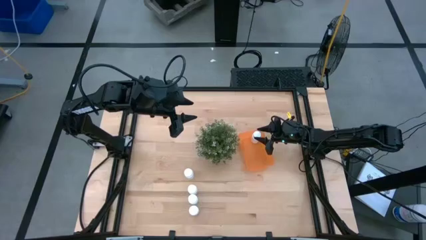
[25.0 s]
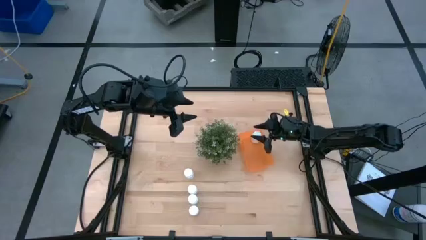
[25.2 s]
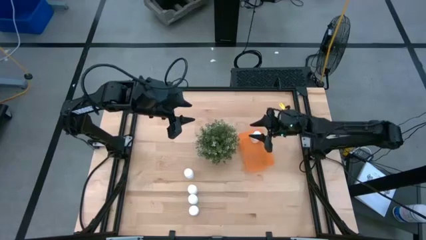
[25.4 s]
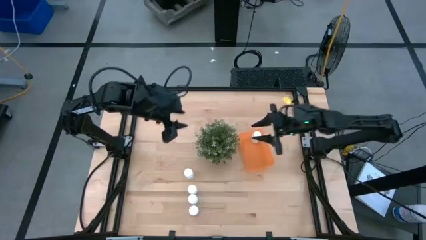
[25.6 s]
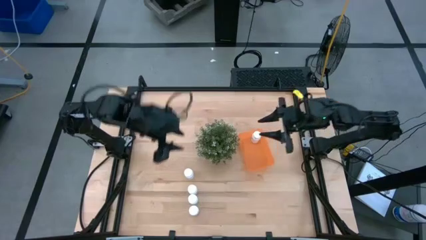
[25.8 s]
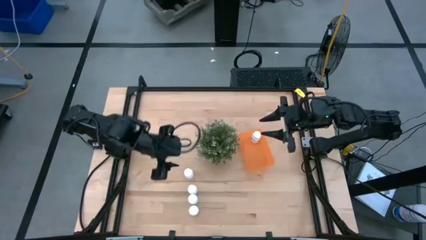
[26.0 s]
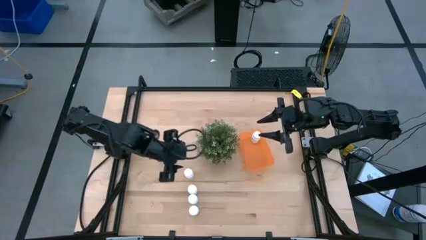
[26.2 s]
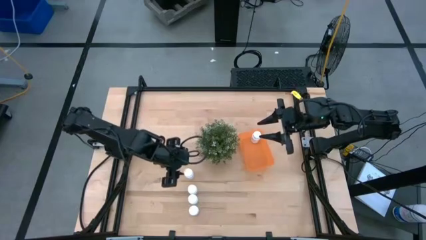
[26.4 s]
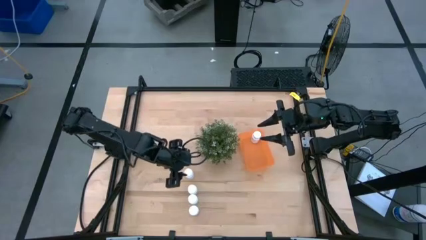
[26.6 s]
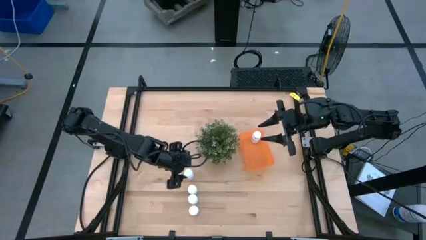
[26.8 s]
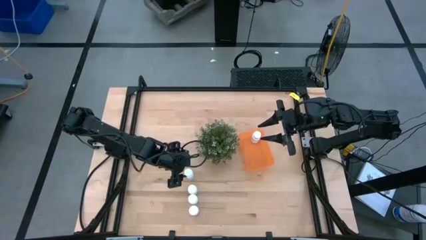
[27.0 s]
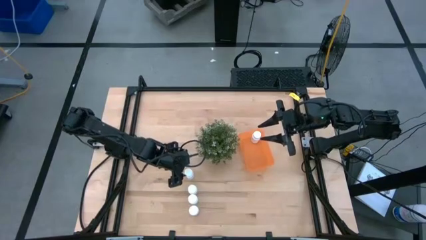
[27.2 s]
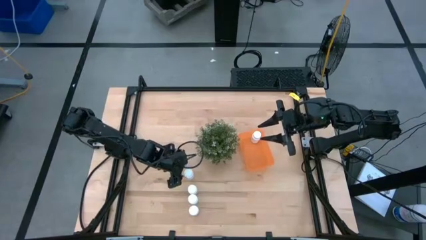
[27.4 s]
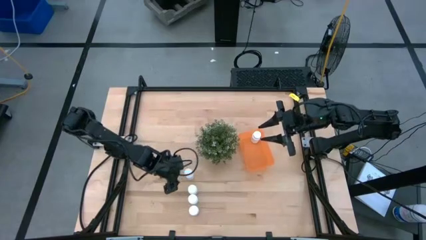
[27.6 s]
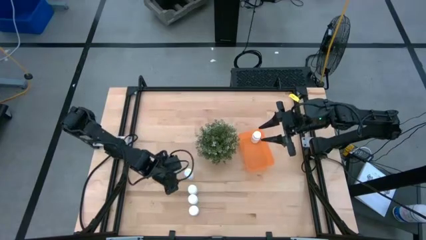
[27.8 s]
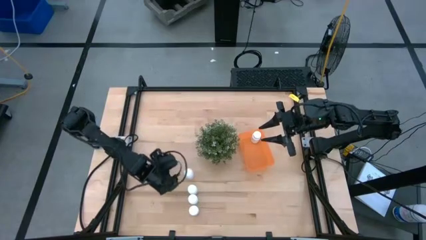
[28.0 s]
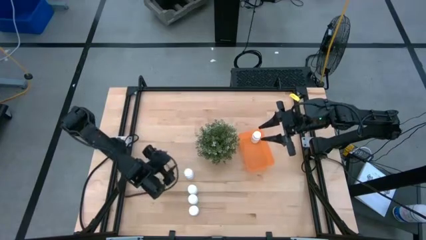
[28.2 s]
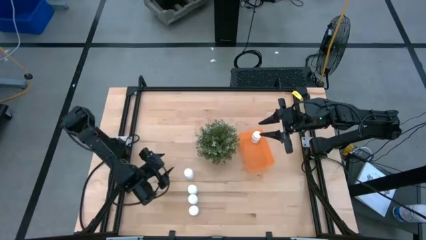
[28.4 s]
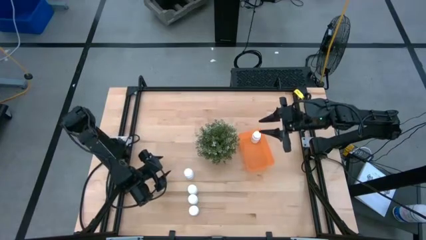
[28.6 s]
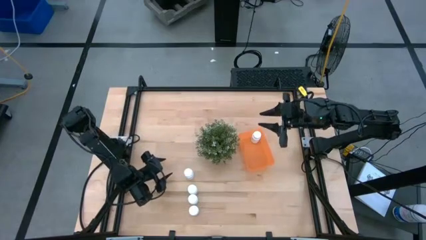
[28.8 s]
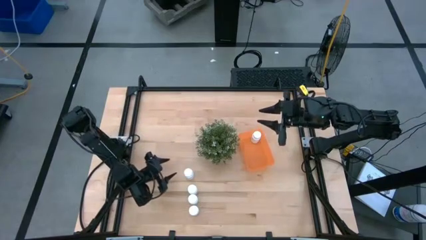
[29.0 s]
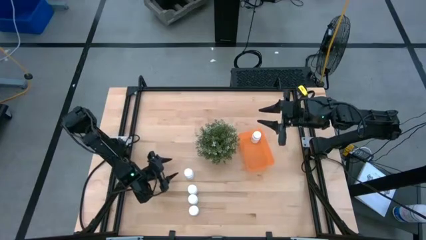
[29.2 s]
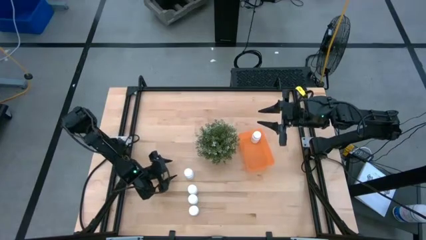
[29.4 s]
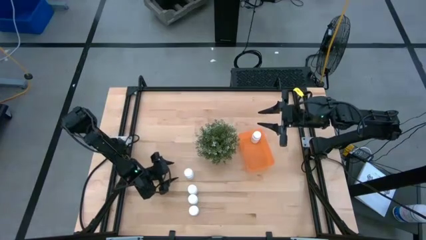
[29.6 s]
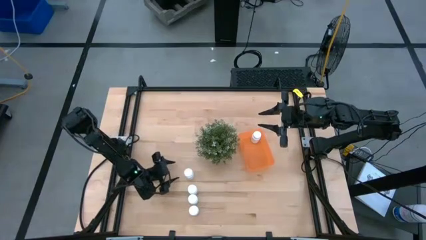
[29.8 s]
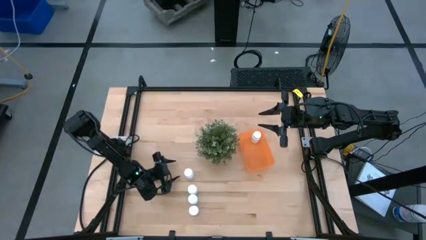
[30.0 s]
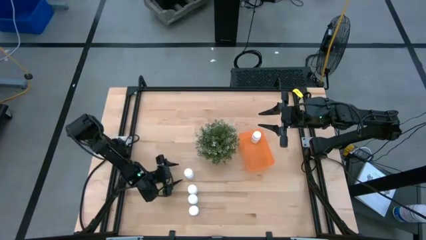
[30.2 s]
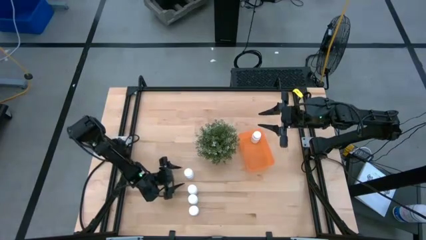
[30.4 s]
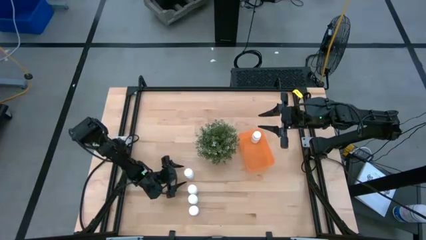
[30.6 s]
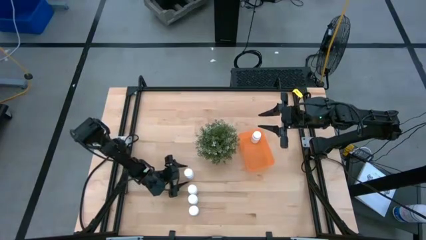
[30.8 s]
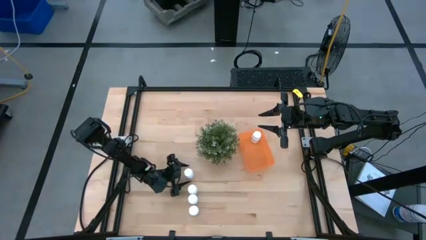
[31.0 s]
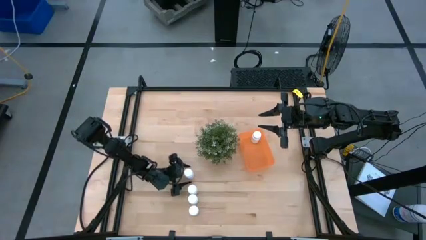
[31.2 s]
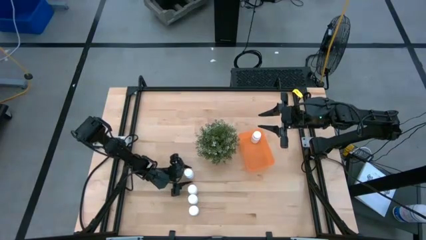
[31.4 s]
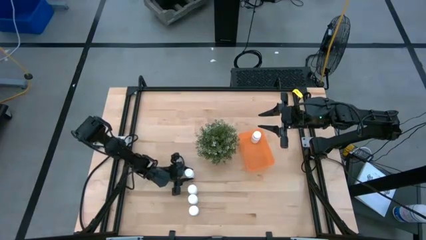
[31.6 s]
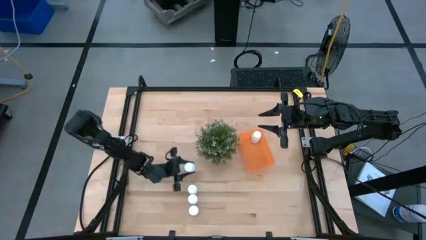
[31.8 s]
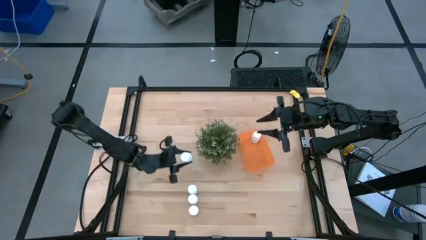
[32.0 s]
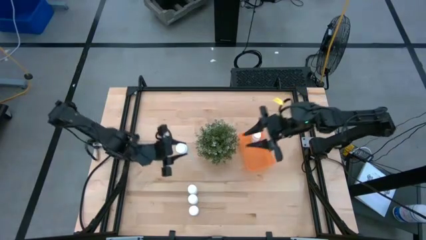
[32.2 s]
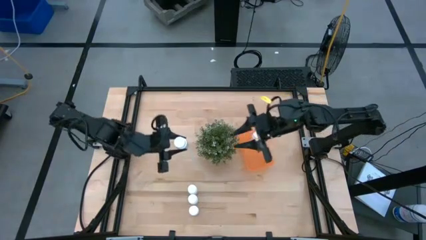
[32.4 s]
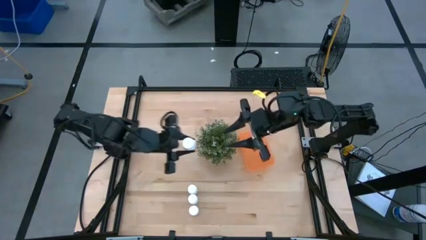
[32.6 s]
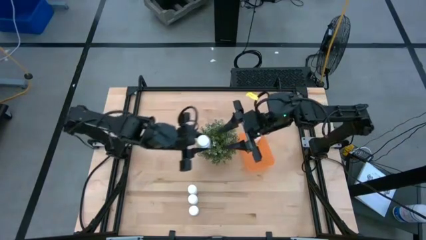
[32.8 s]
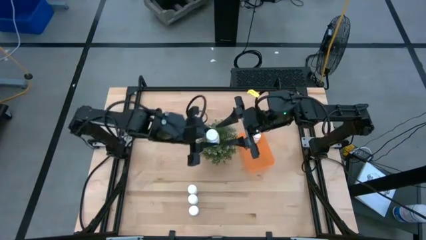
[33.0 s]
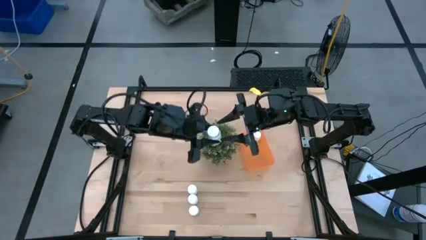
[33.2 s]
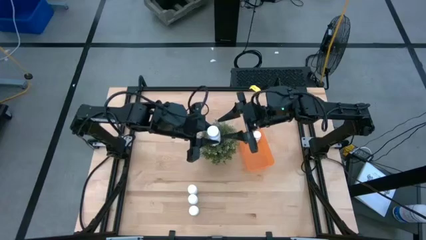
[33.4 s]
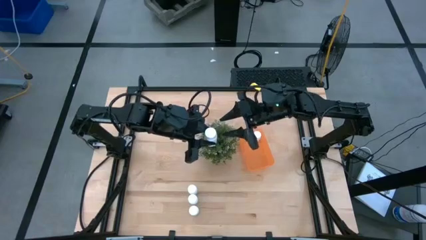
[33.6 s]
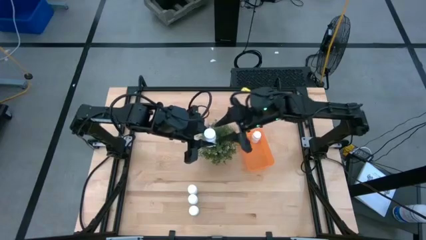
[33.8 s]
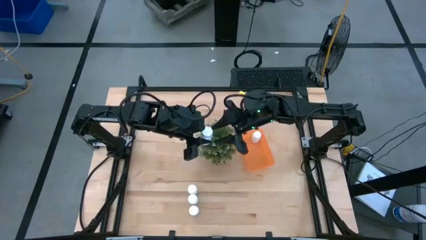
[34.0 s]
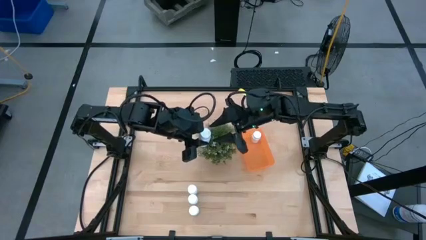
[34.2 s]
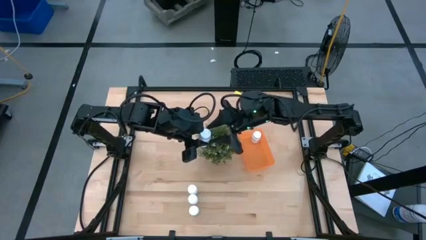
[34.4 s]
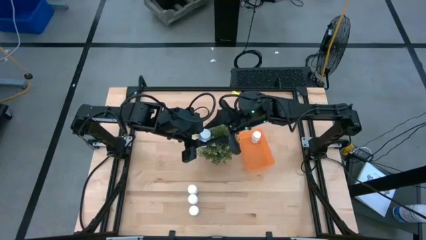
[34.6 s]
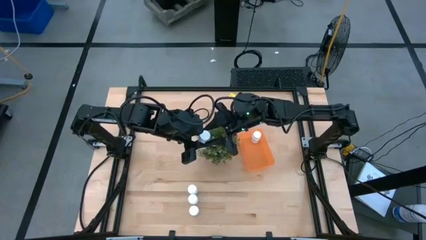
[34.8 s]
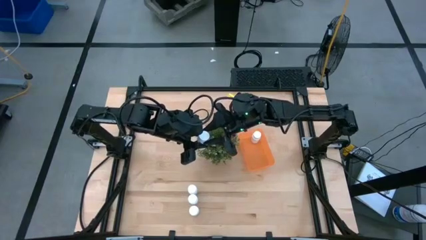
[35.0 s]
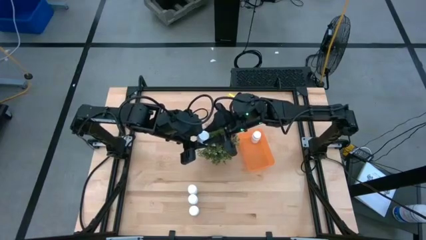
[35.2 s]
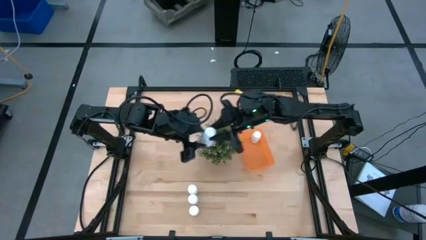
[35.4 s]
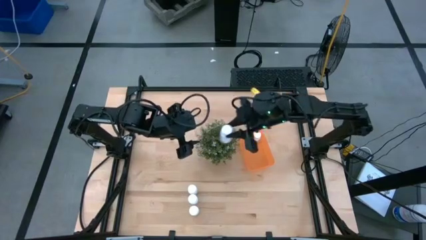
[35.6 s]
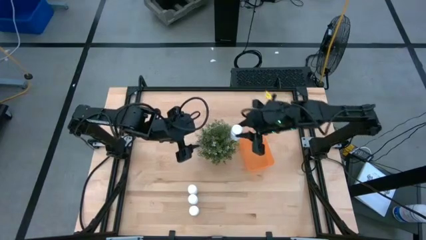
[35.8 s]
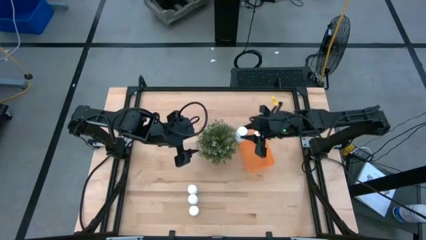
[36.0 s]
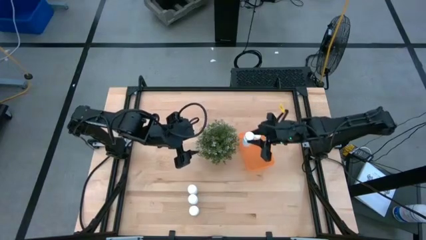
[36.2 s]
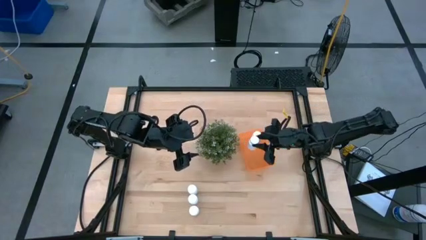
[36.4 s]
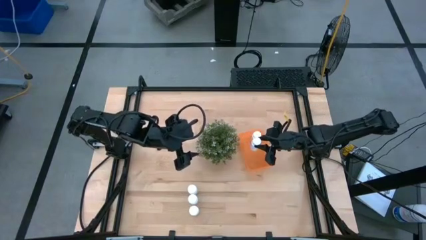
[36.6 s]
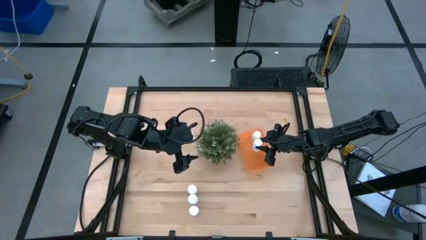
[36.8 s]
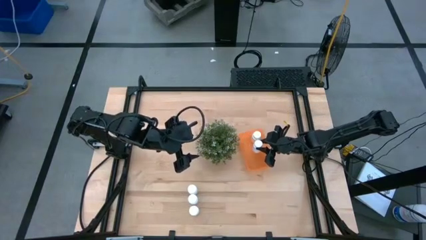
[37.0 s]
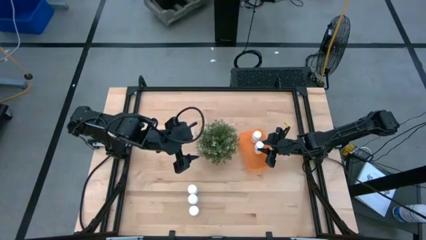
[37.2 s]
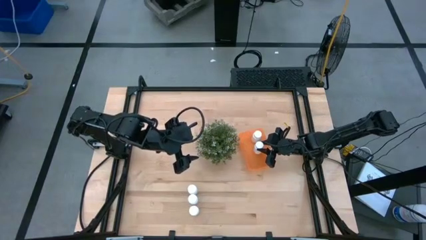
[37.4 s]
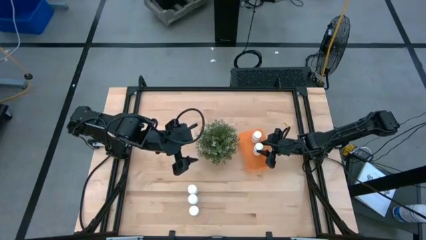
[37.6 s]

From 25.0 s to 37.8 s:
Task: Pick and place pill bottles into a basket
Put the white medicine bottle into the orange bin

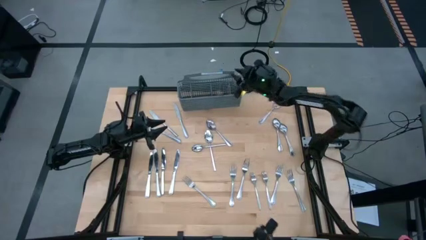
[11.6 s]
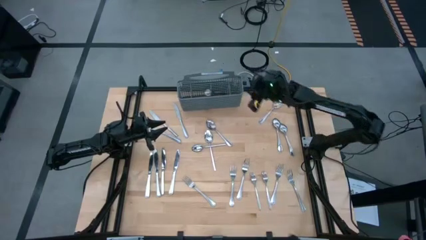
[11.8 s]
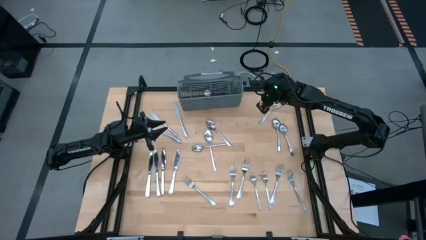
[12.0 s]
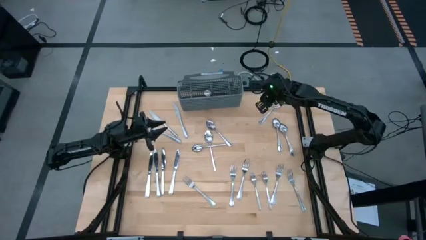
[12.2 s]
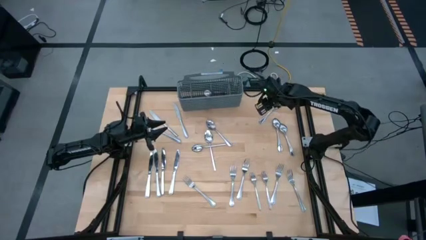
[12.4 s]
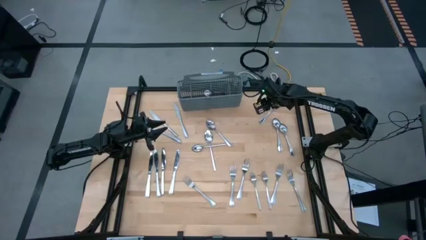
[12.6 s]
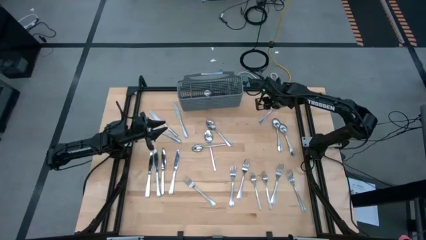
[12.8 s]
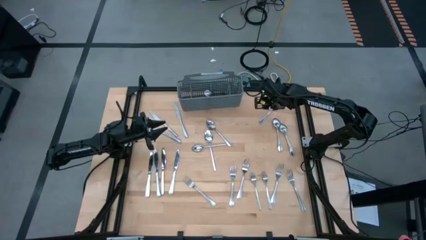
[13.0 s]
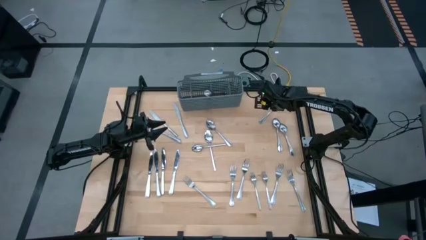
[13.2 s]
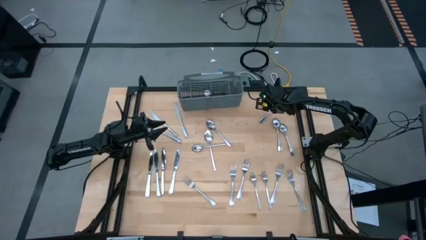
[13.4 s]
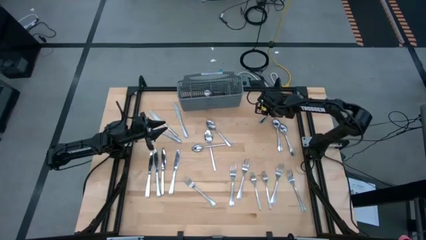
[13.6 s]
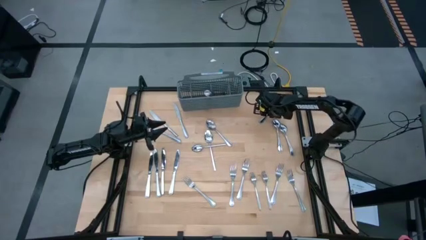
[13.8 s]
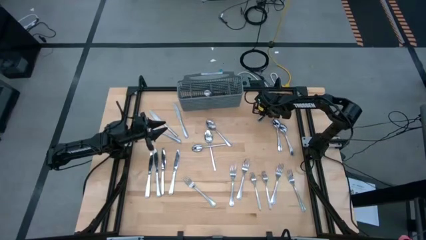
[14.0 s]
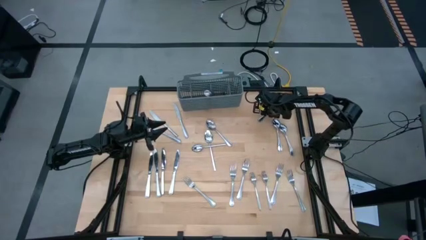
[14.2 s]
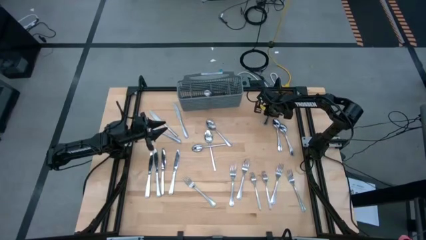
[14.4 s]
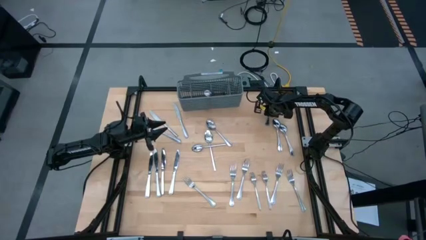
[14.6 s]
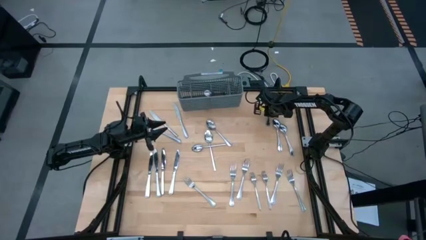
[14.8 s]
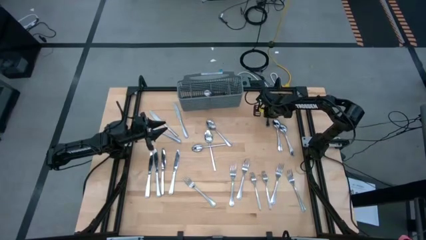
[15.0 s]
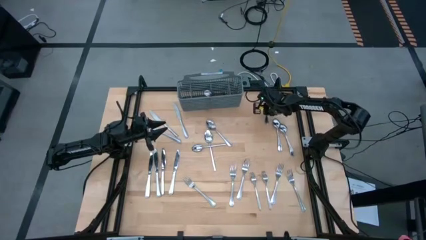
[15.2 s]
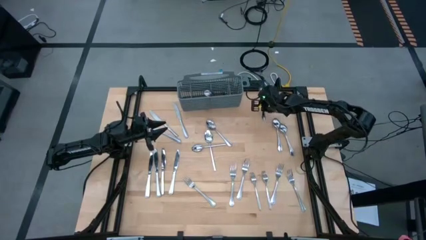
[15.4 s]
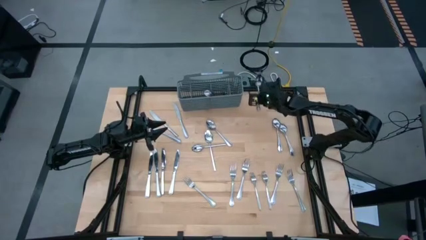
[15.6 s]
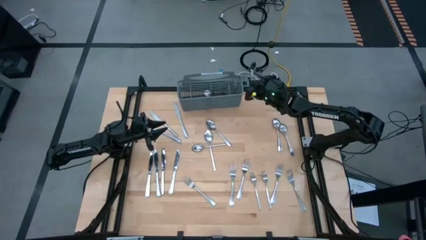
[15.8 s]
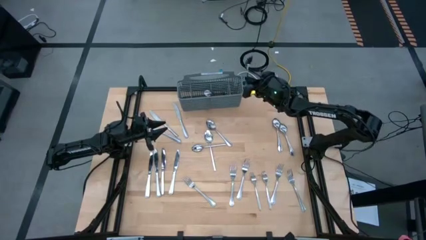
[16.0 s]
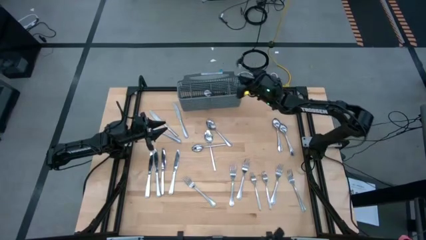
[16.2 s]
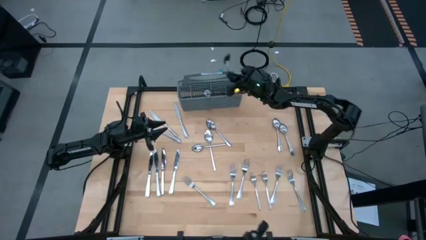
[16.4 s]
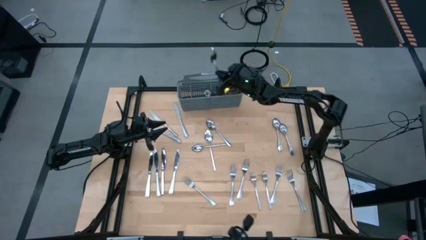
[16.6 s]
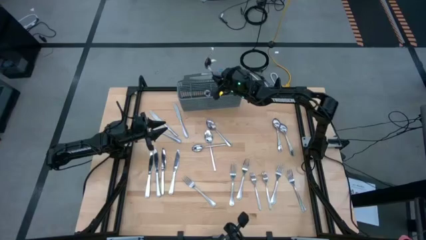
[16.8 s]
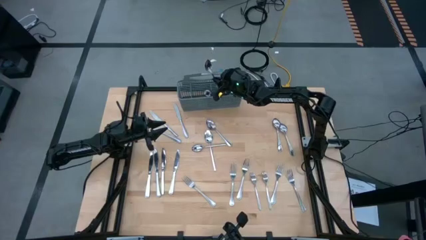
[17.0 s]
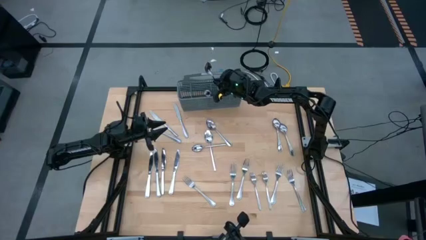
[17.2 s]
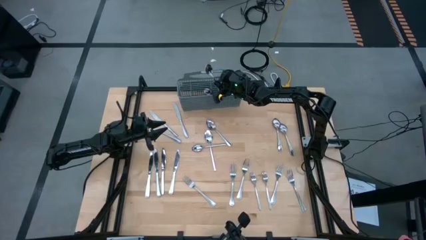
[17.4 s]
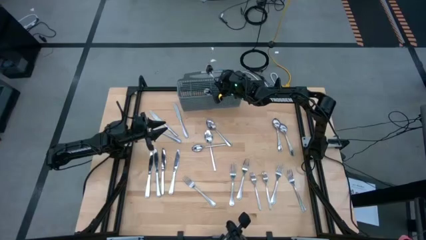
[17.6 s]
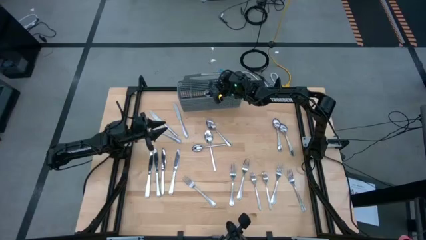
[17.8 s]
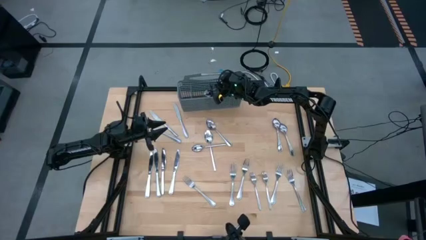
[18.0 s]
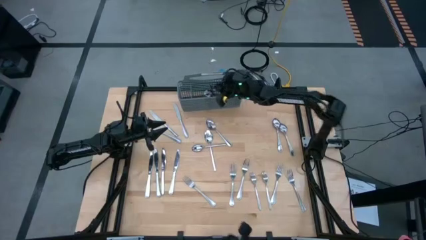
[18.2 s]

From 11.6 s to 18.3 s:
Task: Sort silverware
Put the silver spoon into the gray utensil holder
